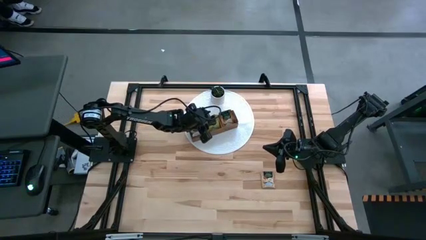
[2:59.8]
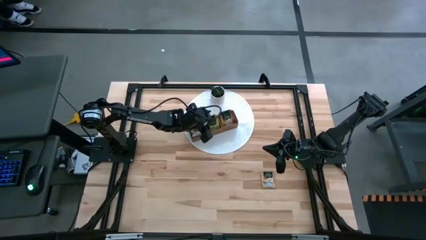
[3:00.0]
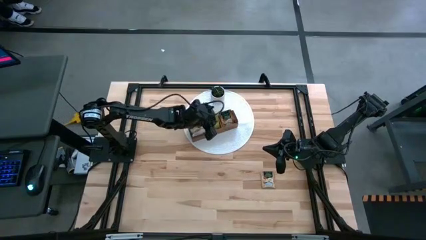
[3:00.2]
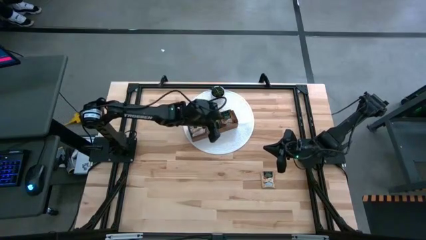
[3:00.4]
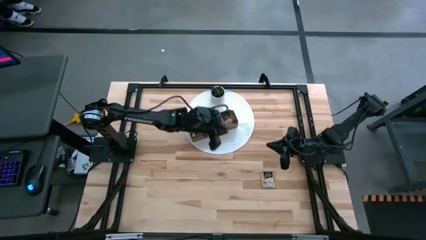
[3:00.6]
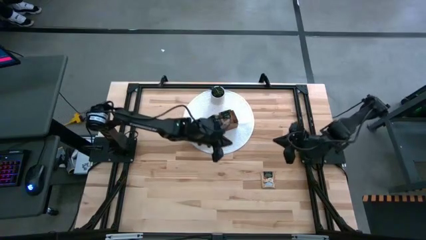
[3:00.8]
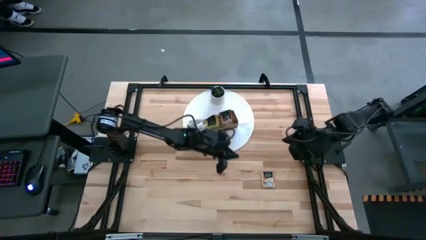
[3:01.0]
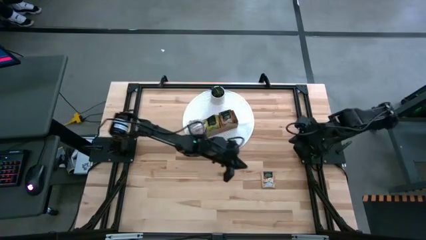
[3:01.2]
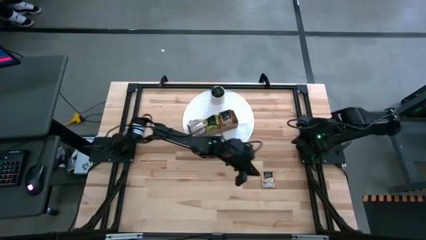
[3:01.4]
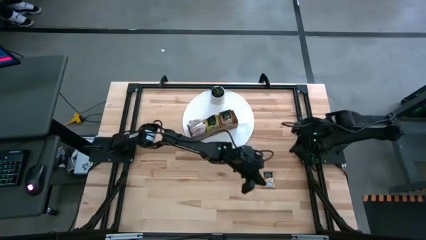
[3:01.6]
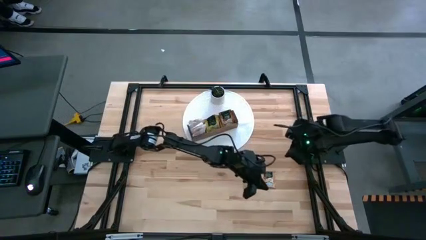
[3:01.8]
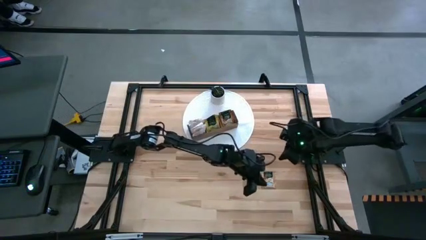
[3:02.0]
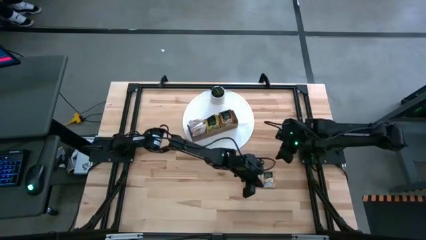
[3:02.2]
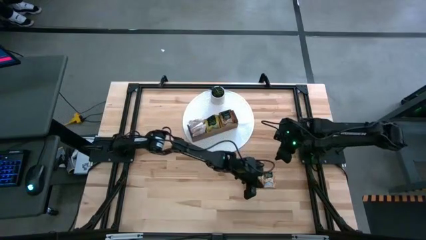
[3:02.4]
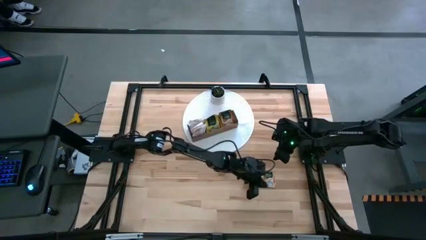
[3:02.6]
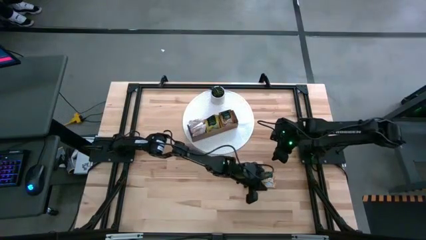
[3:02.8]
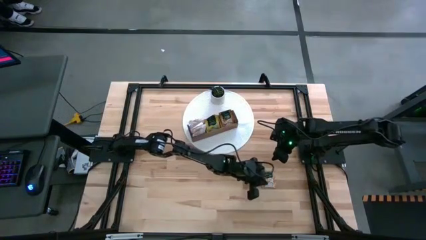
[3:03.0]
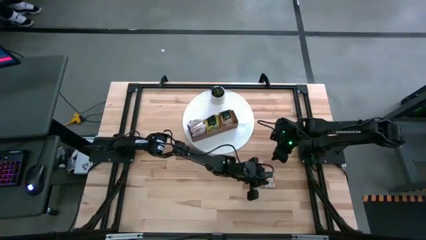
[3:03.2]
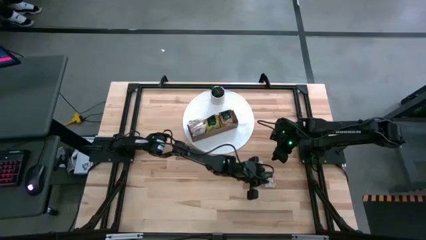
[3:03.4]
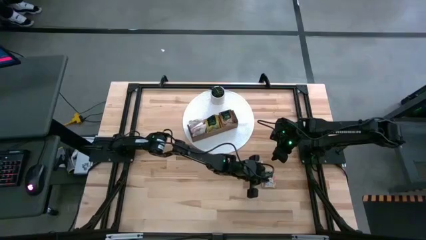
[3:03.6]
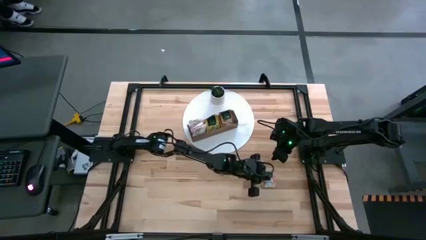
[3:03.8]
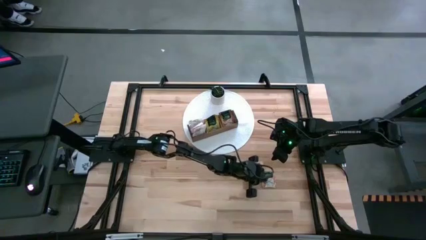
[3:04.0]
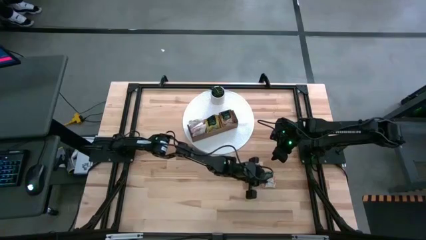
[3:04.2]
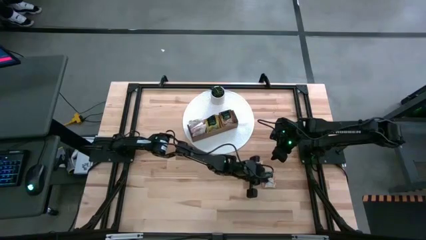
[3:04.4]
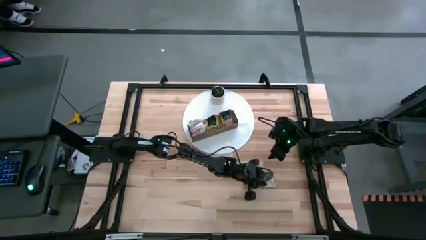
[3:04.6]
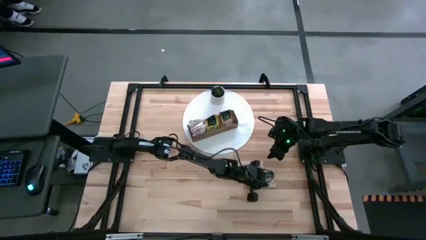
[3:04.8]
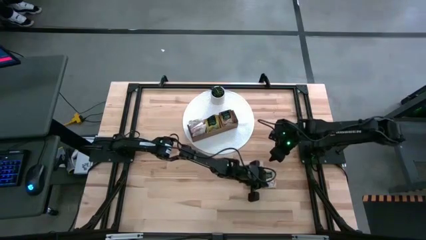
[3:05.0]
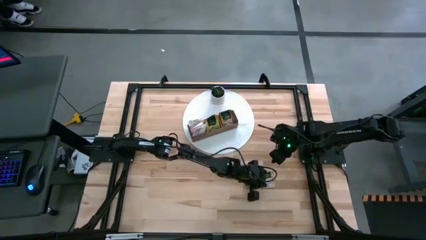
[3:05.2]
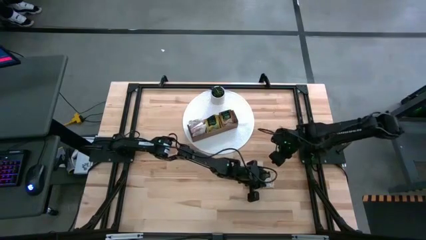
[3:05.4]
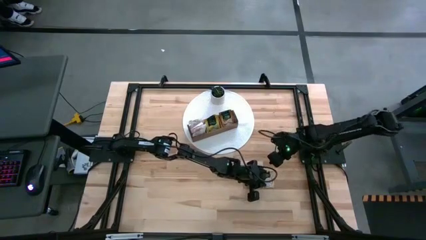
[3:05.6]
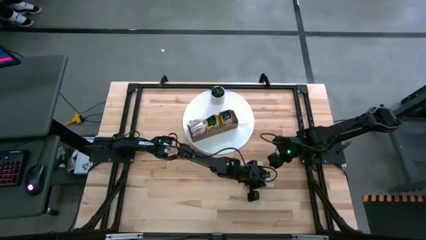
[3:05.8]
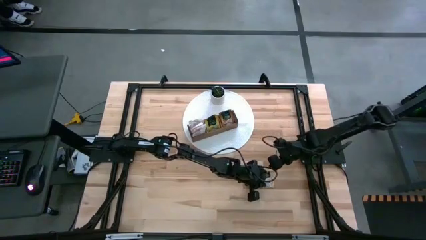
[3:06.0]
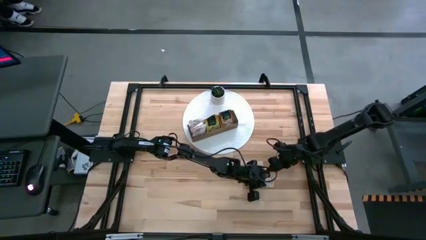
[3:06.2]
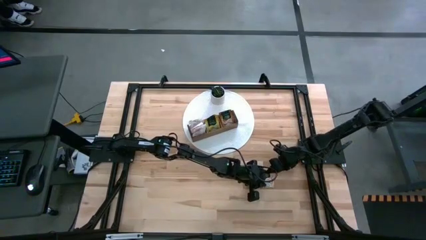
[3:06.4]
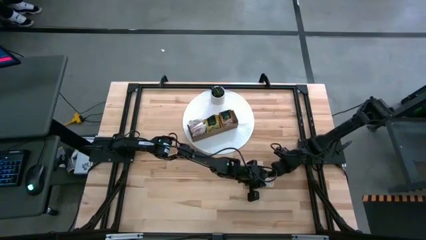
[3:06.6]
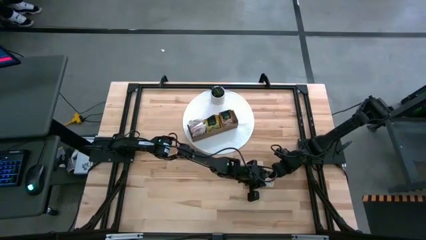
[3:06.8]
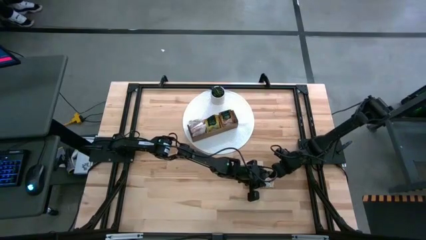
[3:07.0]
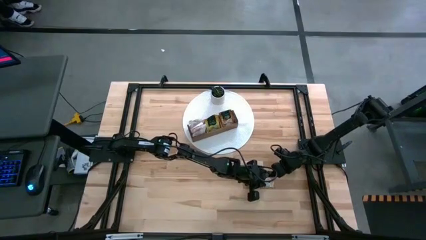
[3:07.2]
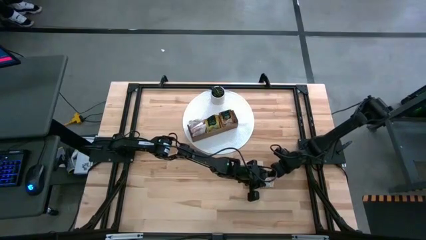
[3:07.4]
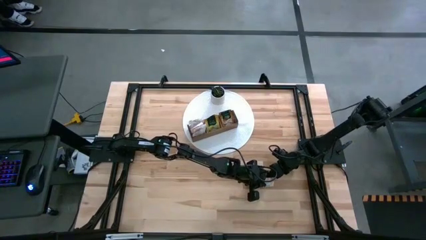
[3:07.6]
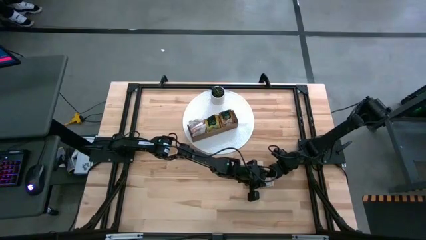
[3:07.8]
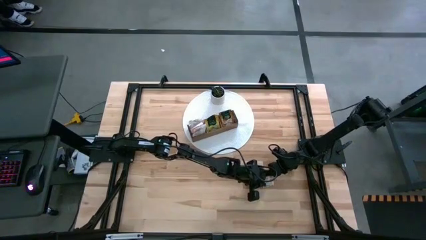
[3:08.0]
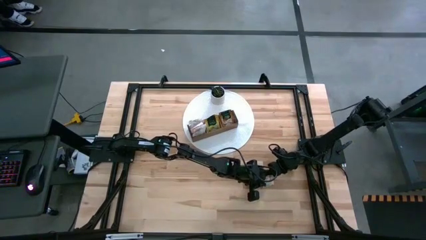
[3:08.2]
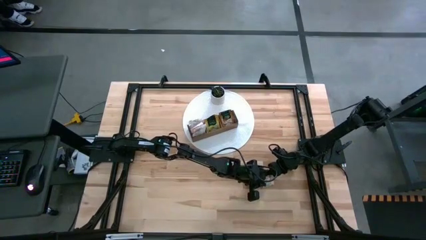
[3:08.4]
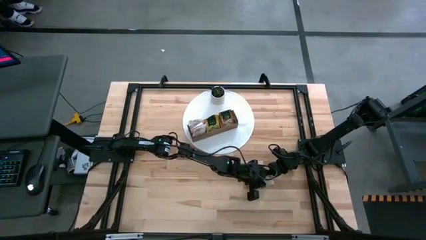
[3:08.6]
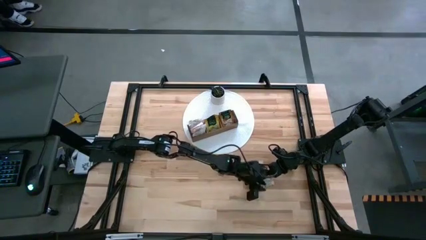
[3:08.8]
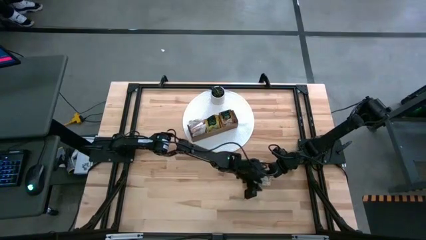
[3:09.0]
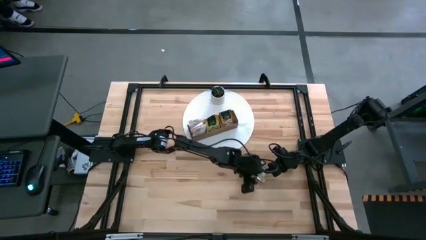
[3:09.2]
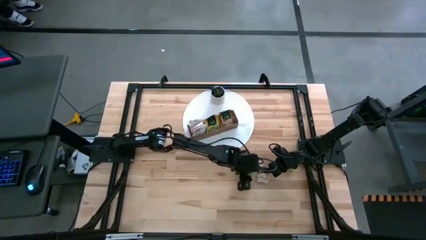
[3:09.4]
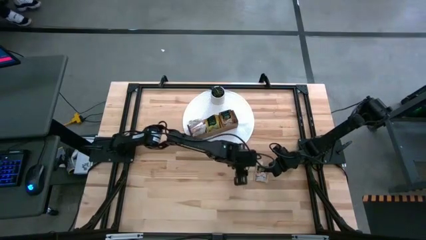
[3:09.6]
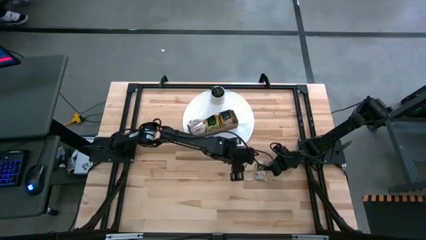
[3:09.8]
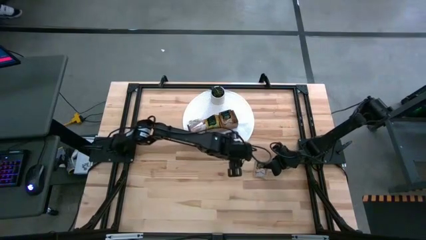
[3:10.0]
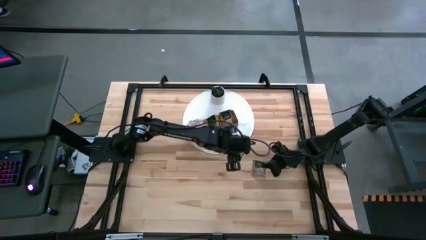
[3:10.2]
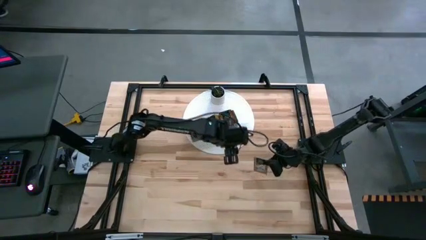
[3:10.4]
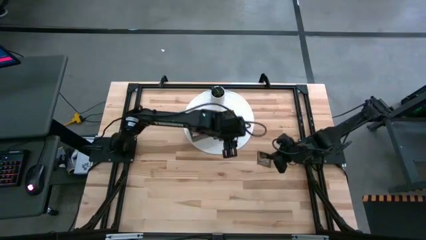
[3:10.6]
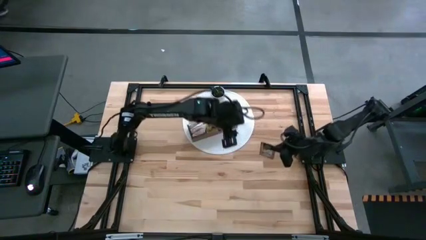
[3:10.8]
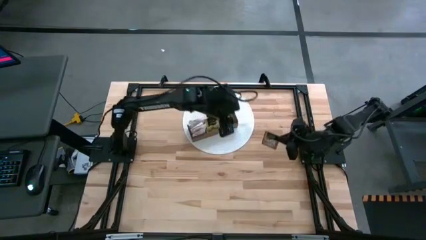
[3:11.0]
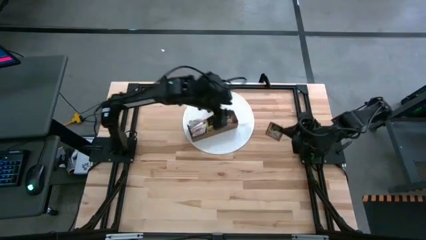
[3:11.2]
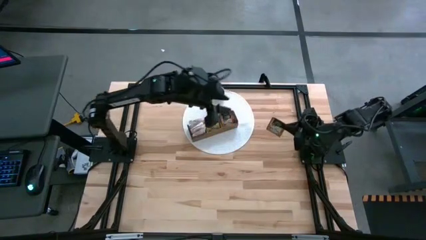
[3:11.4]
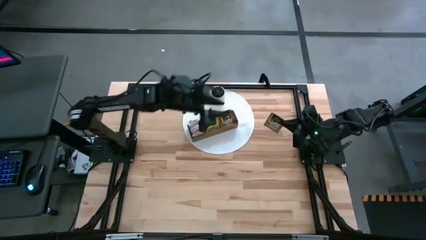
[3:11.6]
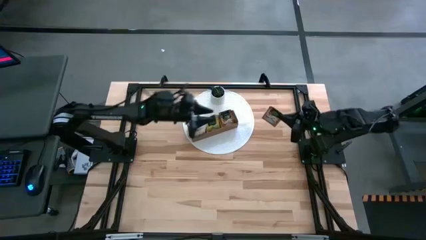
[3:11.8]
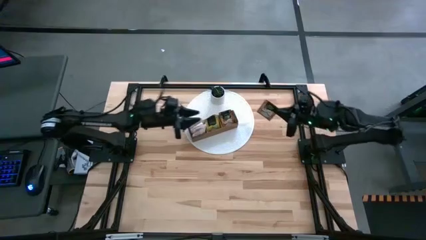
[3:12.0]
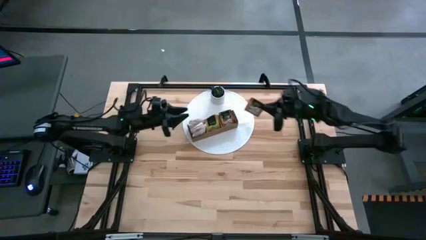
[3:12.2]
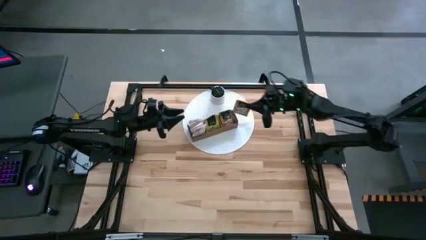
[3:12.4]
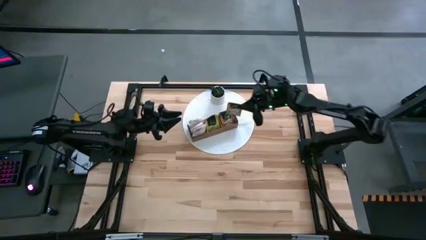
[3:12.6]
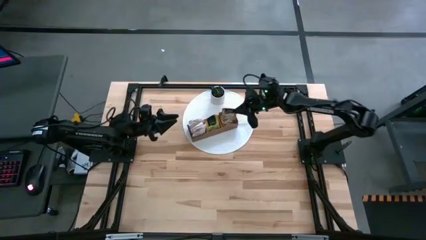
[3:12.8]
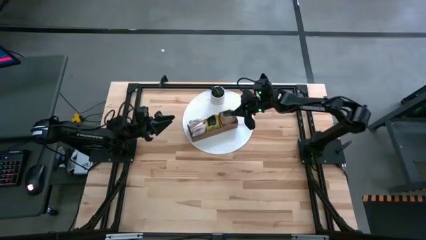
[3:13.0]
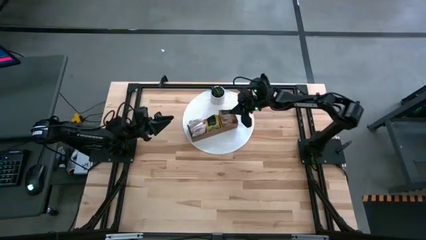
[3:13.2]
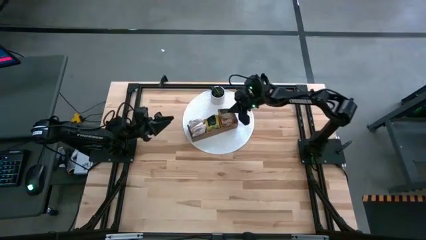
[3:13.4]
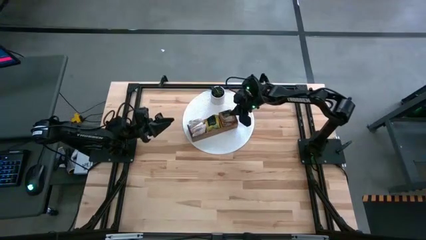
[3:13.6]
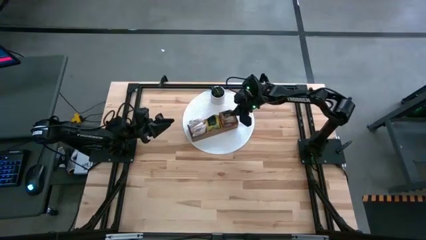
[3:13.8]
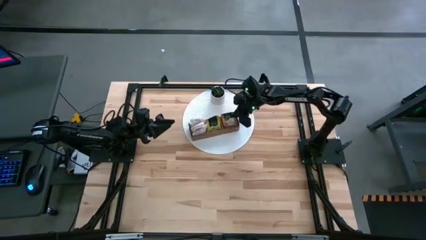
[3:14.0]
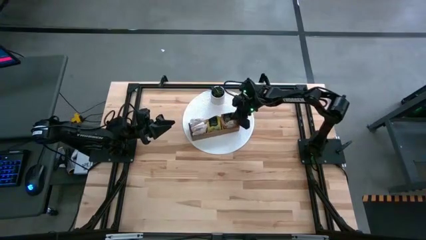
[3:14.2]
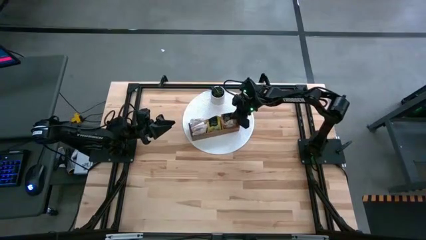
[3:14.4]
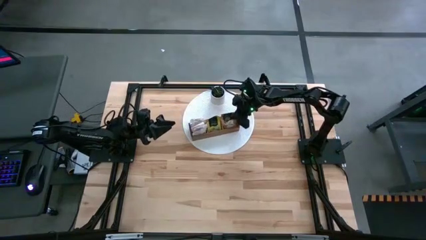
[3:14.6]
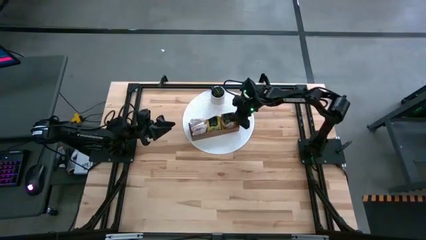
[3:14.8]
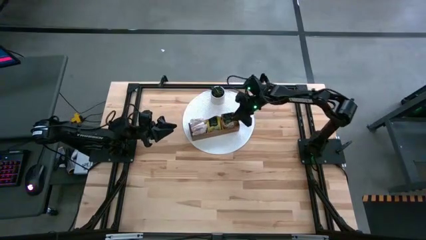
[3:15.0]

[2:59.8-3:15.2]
Task: Pick & Place Tea
Put the brown tea bag into the right section of the wooden organizer

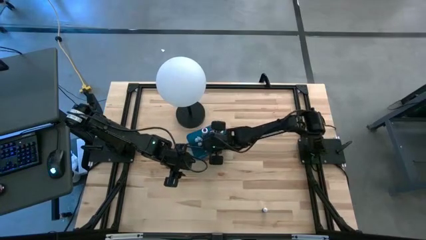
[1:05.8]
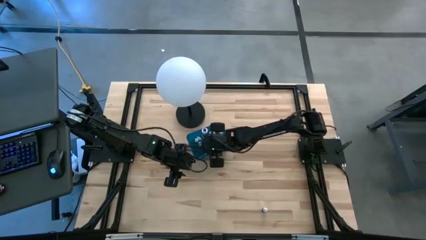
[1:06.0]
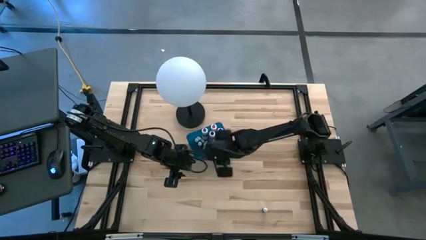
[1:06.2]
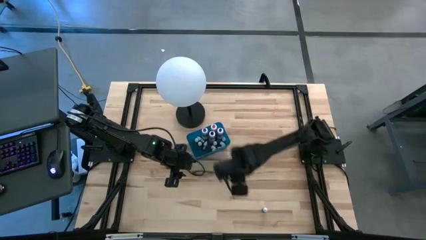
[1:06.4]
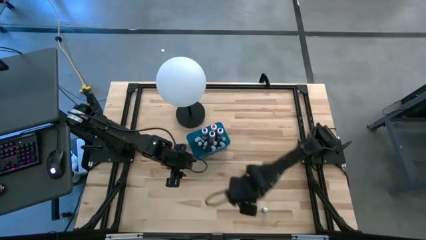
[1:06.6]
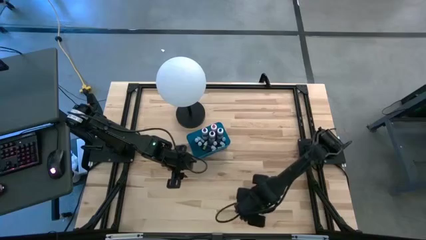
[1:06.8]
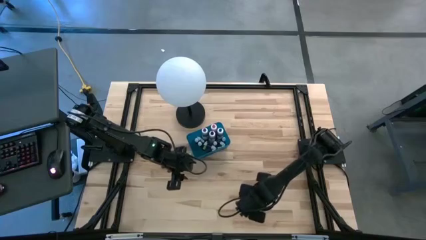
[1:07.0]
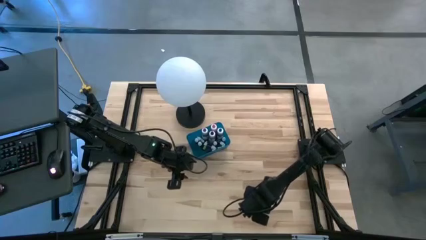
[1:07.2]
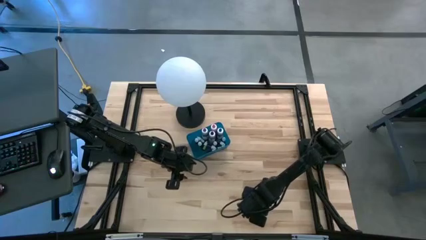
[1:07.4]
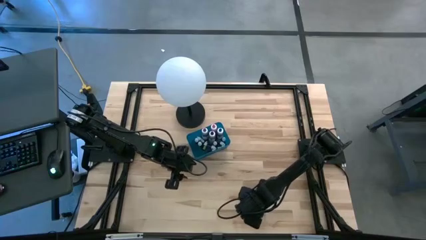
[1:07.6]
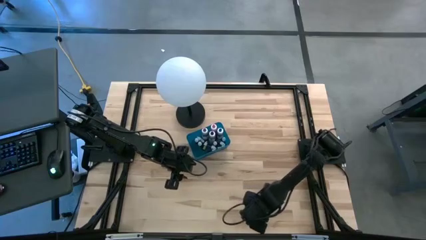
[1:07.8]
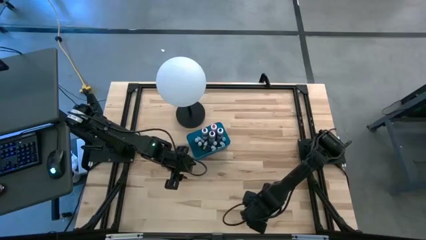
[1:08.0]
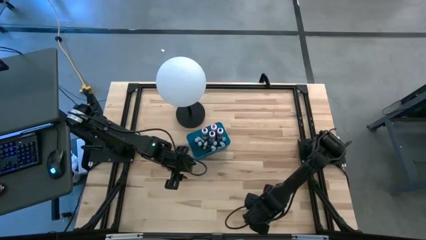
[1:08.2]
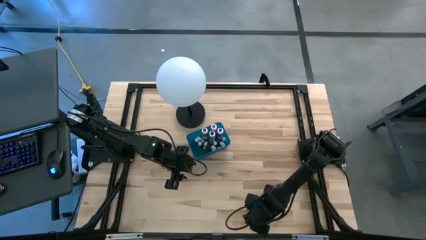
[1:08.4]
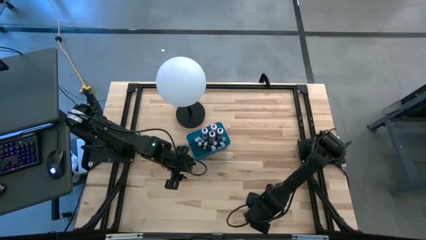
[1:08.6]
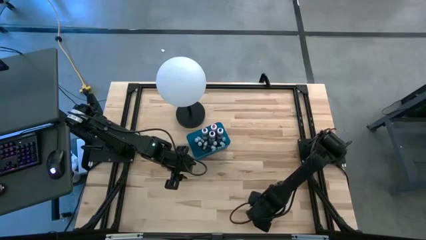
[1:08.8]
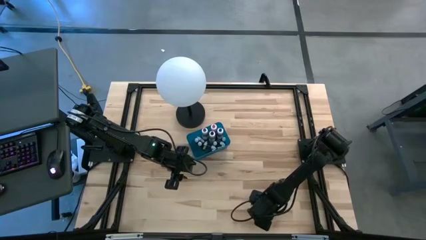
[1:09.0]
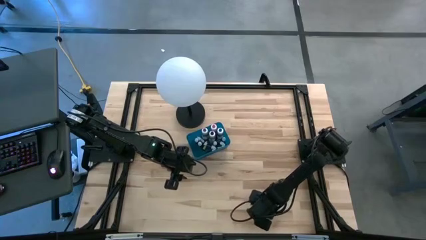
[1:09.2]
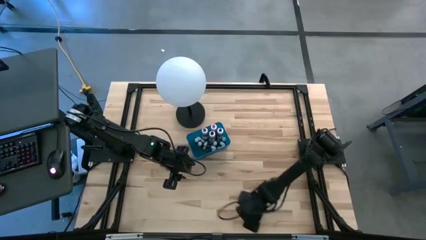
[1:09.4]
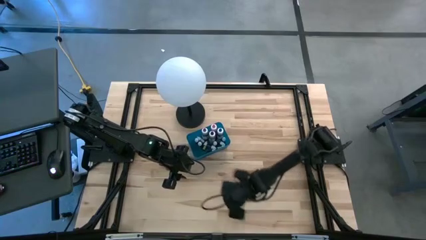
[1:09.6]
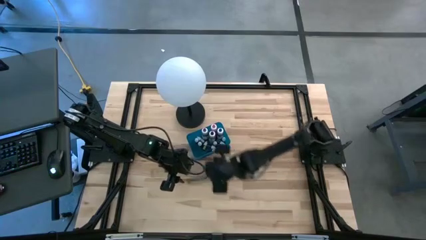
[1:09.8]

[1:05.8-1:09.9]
Task: Pick & Place food coloring
Put the small red food coloring bottle into the blue container
